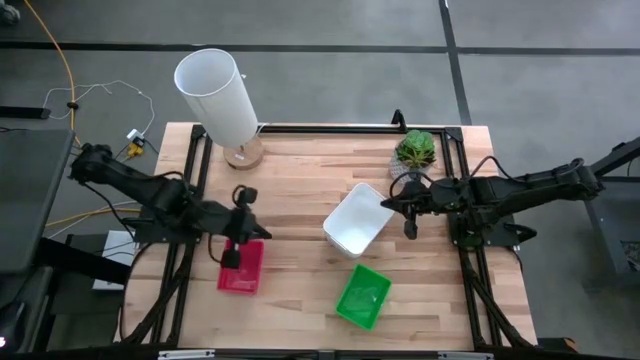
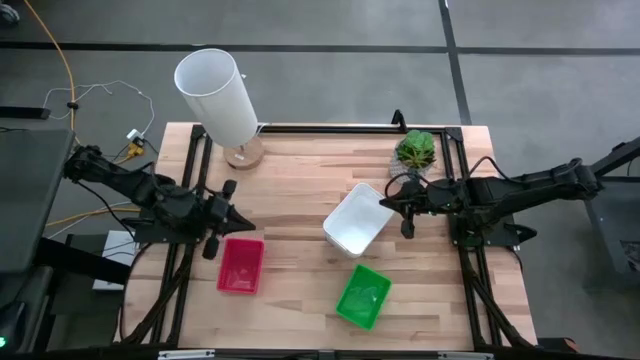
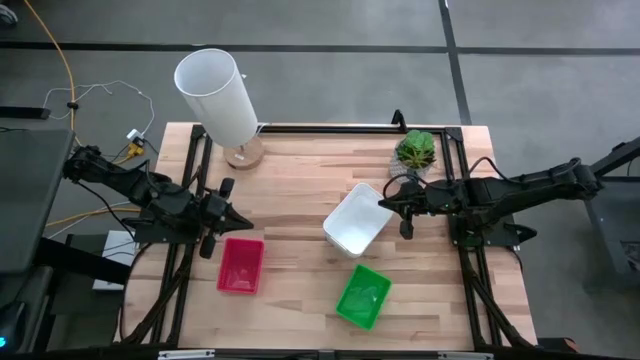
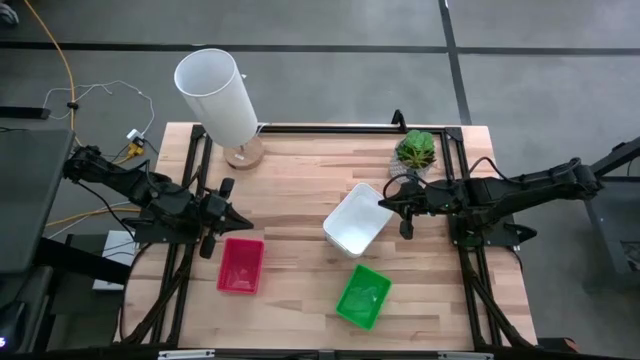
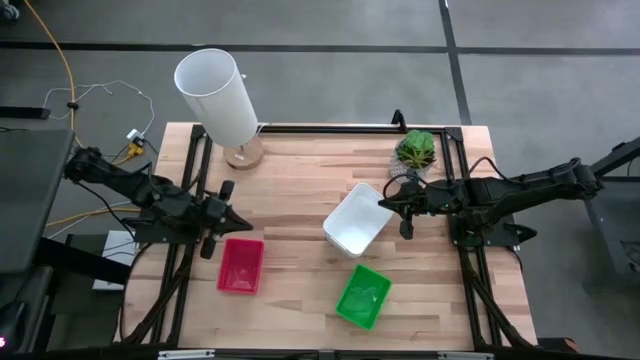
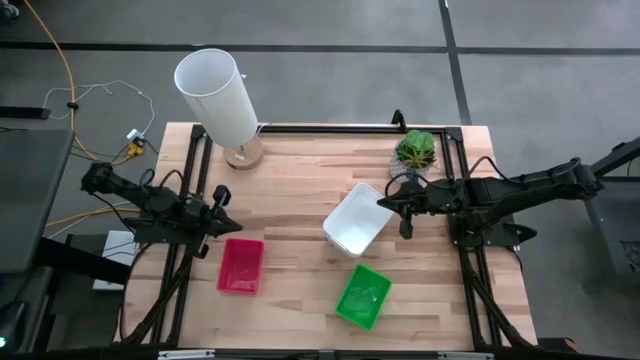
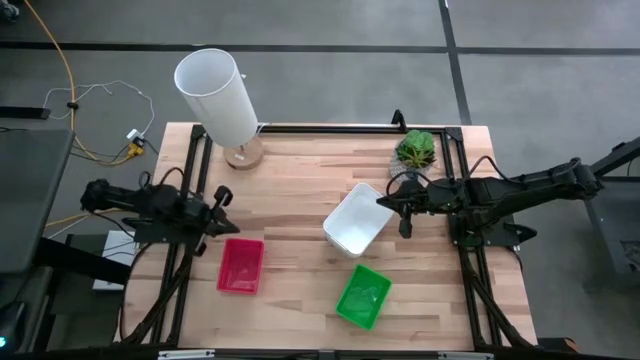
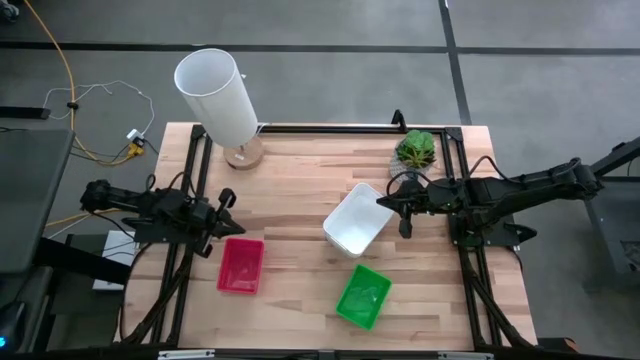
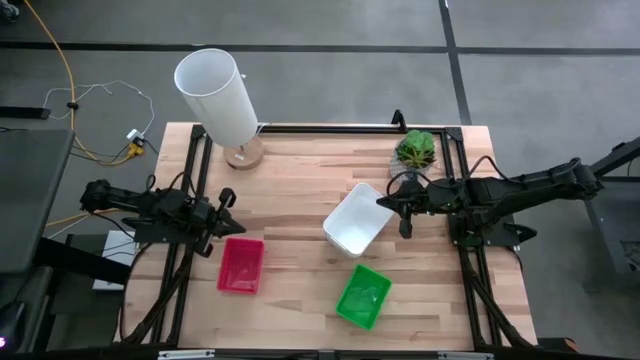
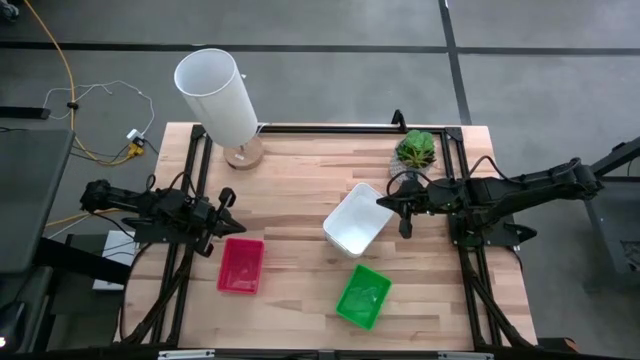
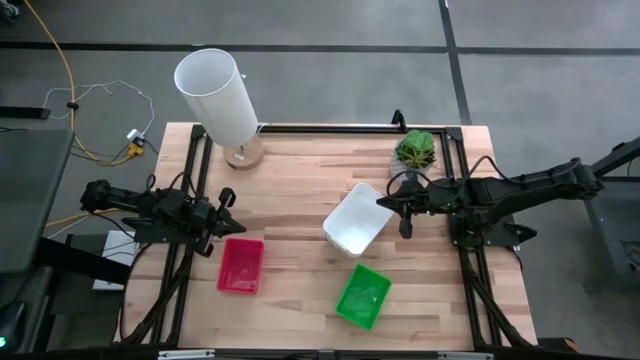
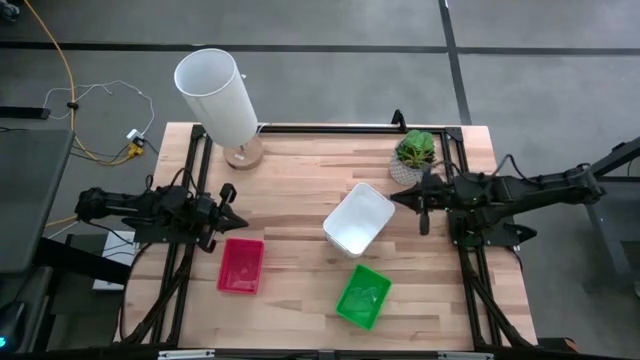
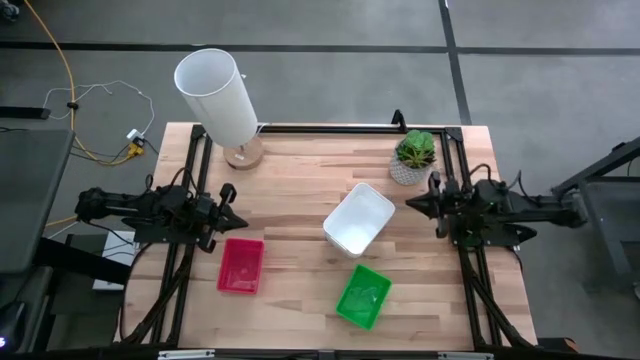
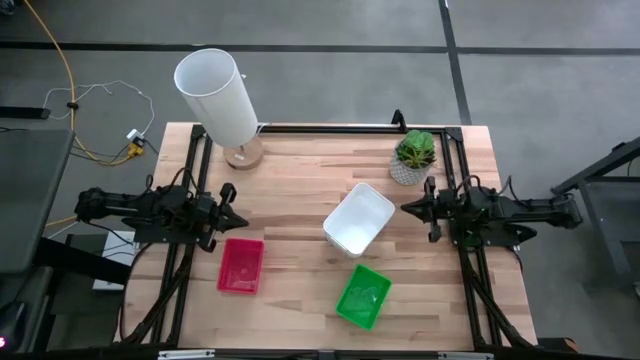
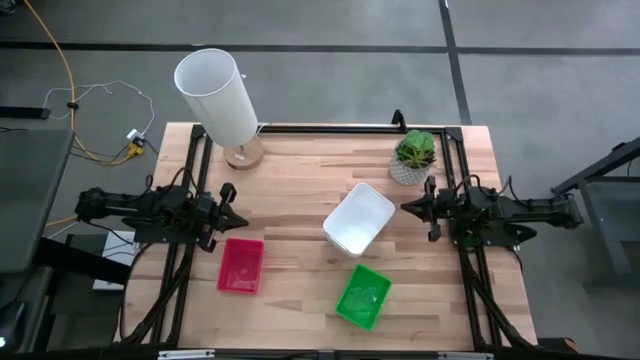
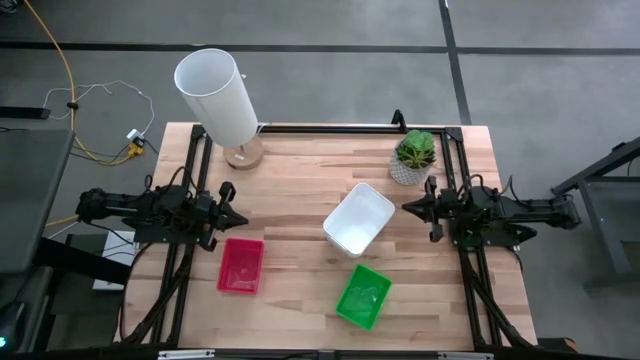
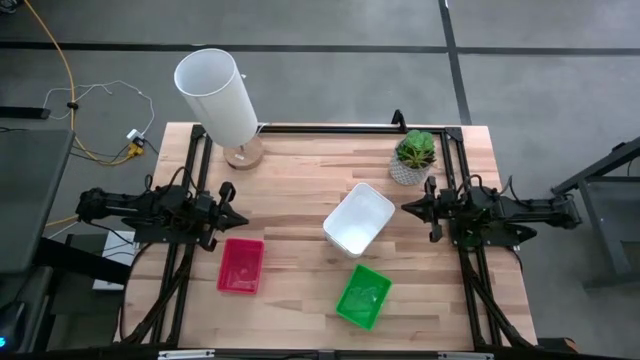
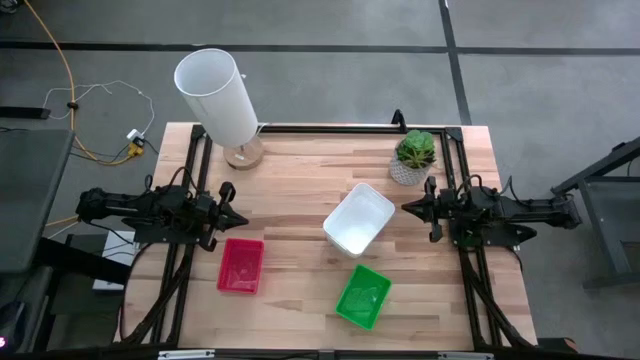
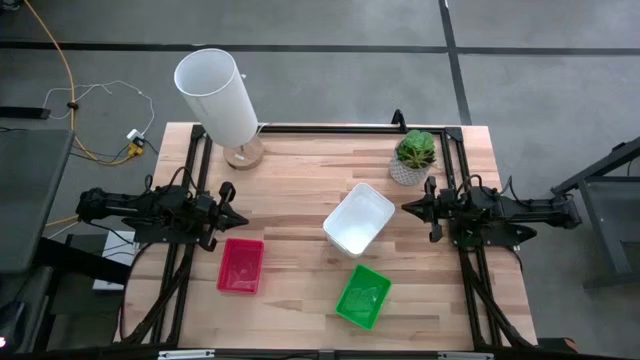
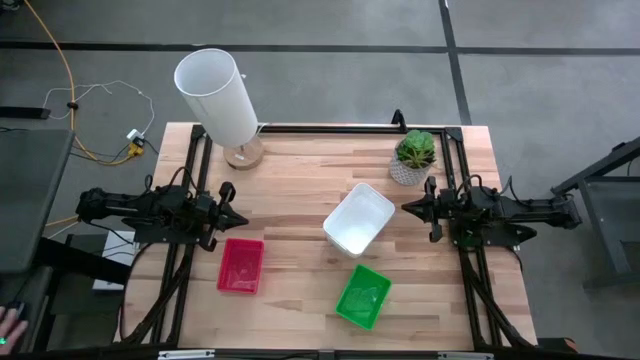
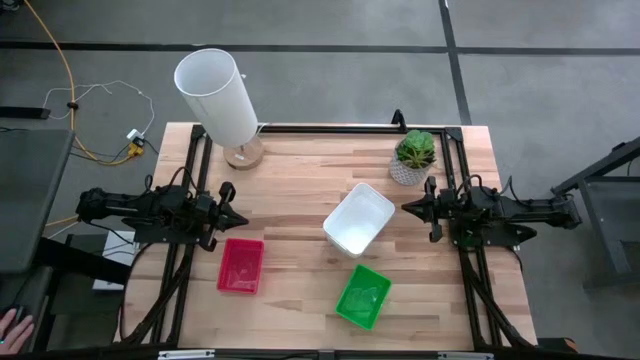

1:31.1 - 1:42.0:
Return to Home Position

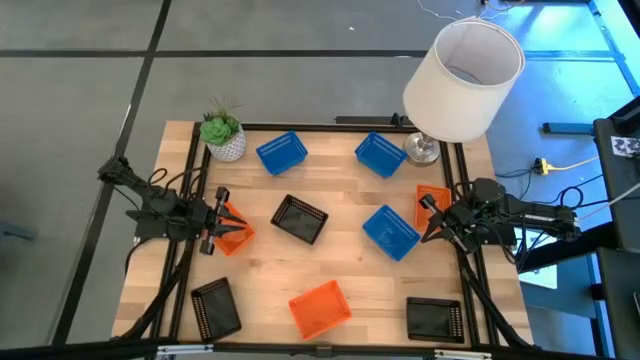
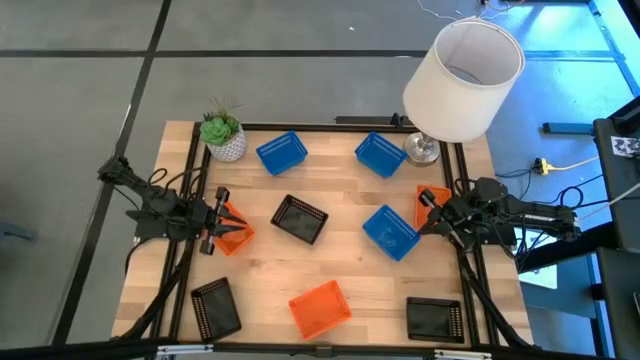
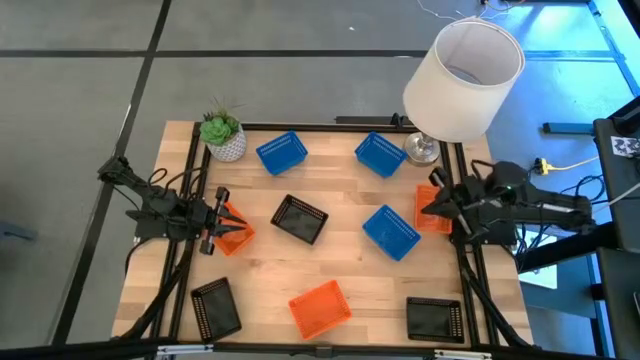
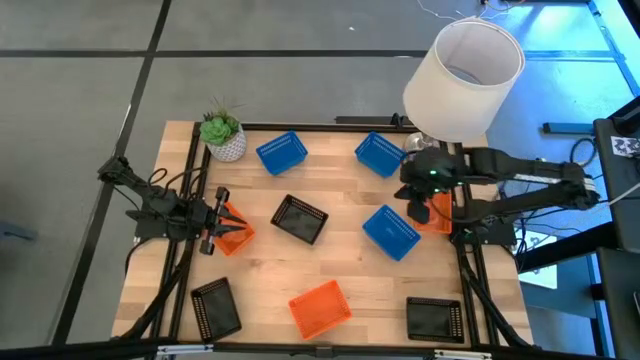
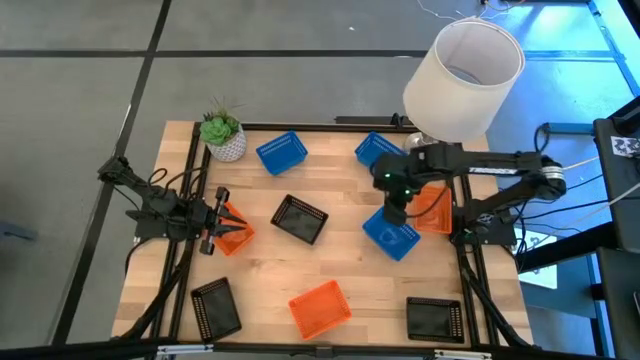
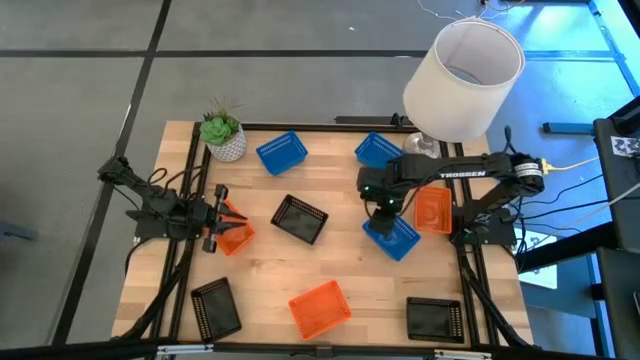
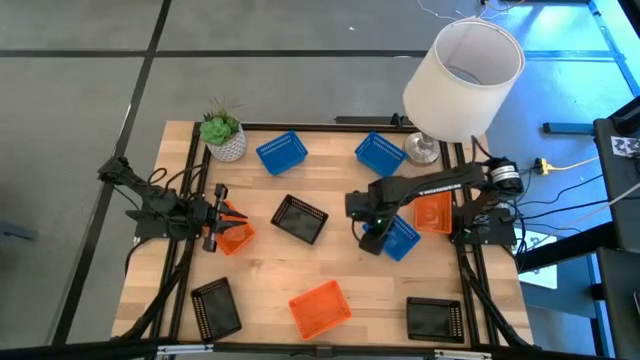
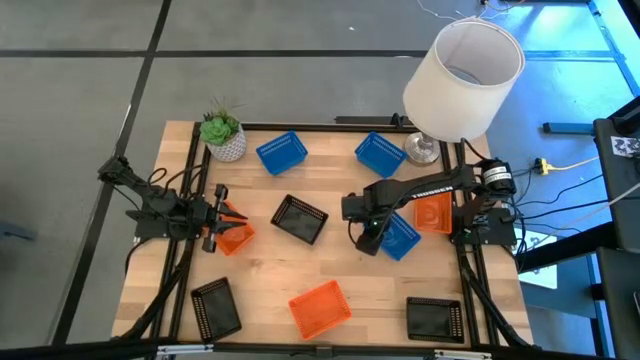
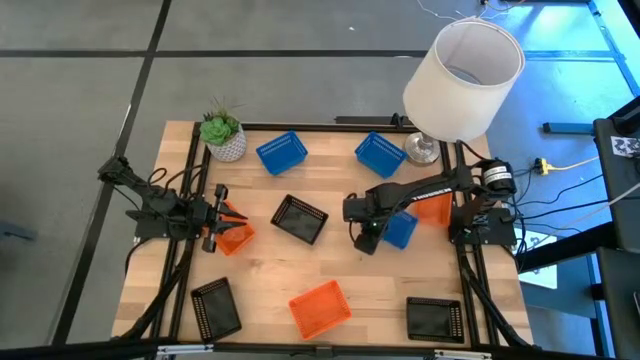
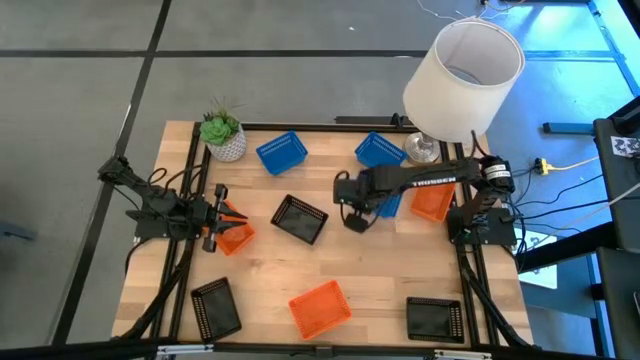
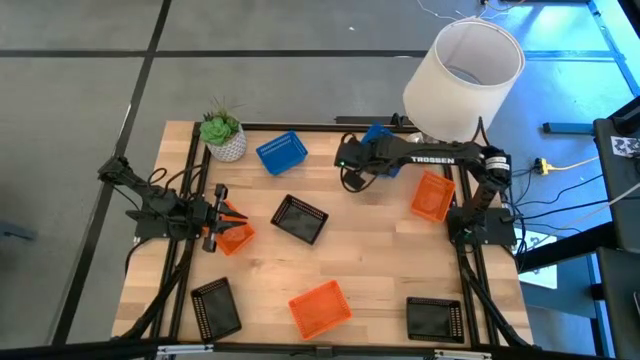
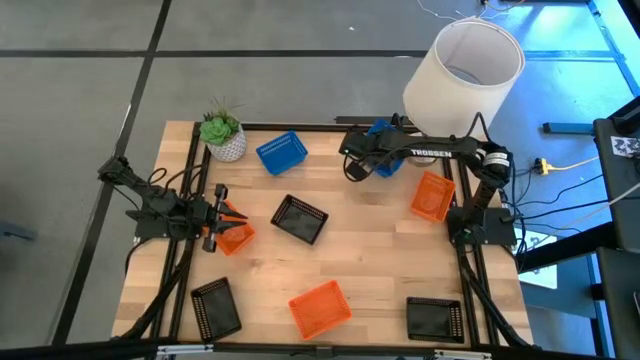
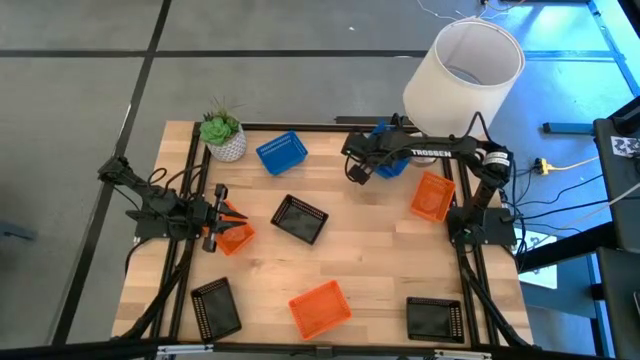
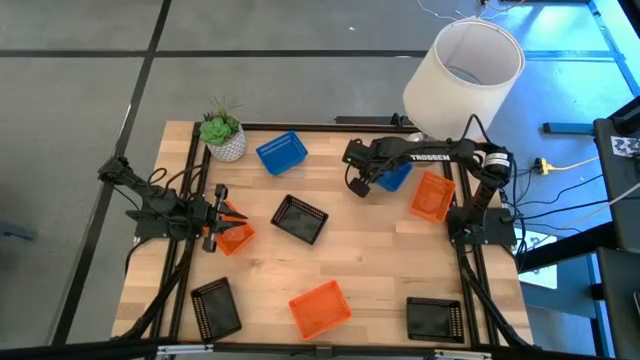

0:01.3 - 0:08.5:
Stack the bottom blue bin on the right blue bin
